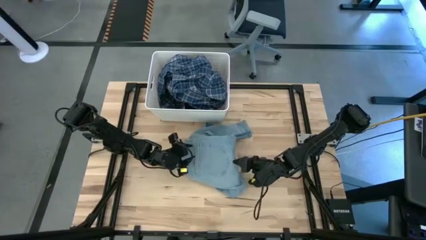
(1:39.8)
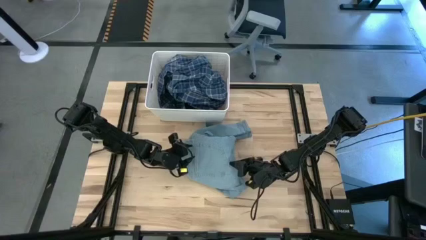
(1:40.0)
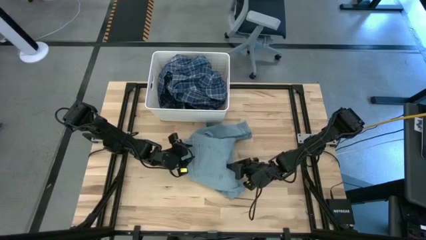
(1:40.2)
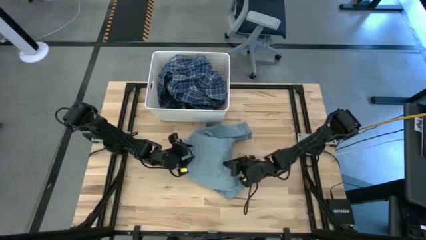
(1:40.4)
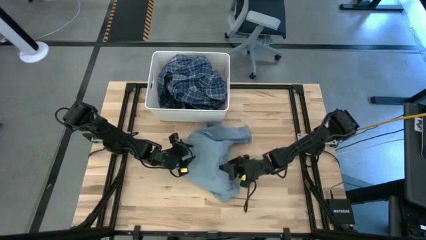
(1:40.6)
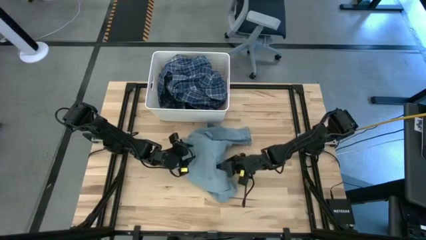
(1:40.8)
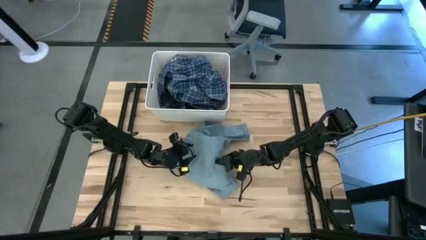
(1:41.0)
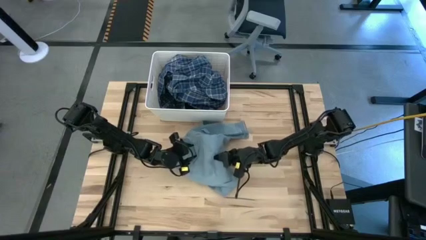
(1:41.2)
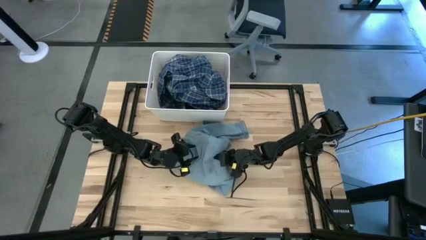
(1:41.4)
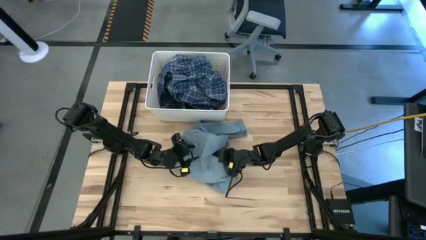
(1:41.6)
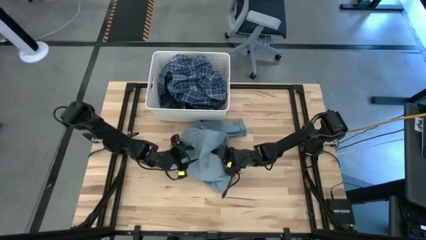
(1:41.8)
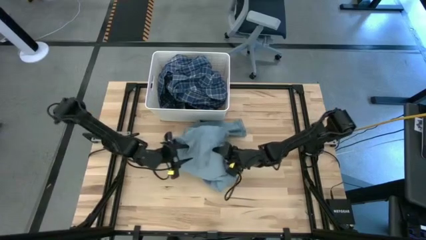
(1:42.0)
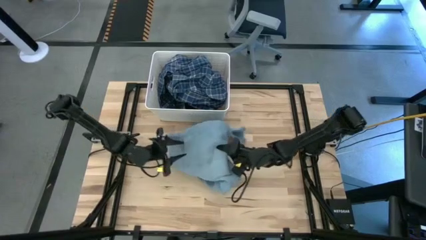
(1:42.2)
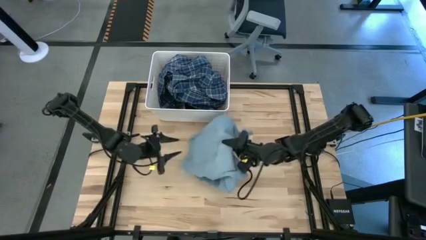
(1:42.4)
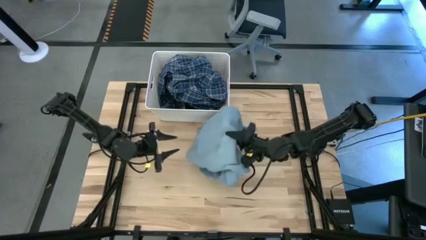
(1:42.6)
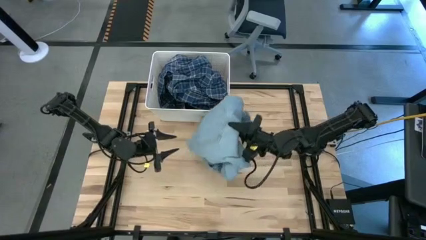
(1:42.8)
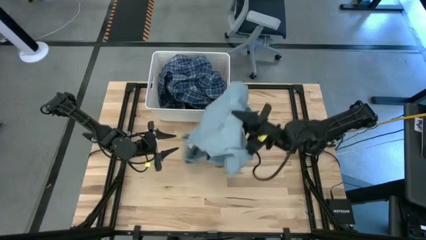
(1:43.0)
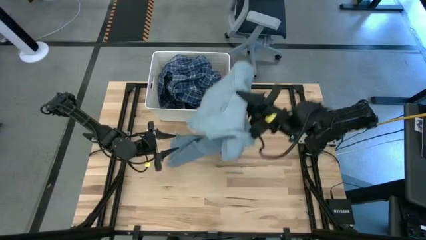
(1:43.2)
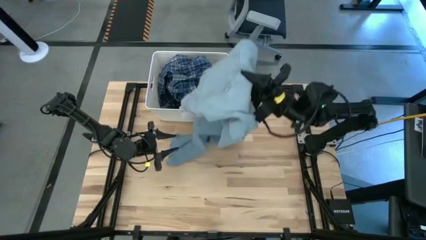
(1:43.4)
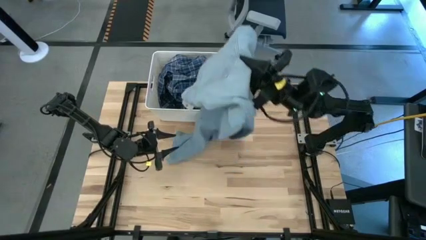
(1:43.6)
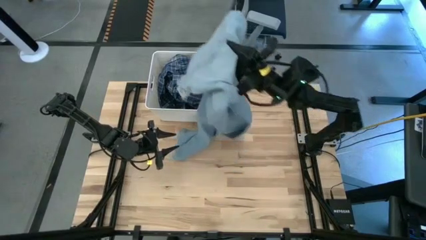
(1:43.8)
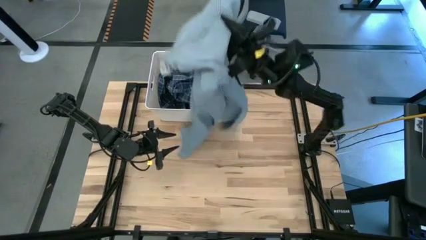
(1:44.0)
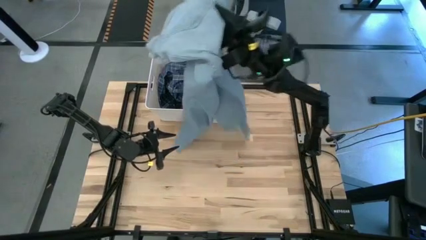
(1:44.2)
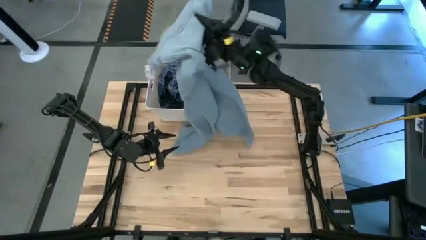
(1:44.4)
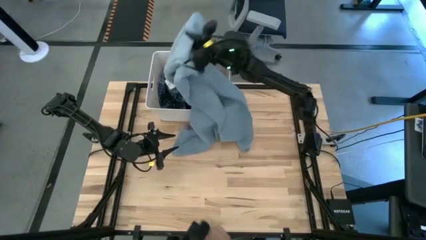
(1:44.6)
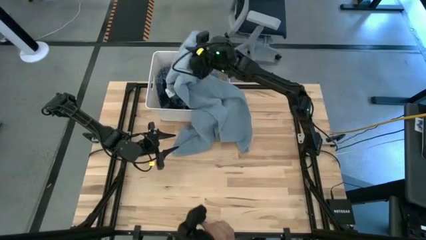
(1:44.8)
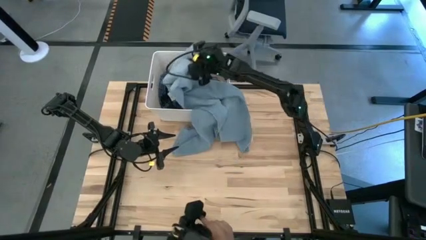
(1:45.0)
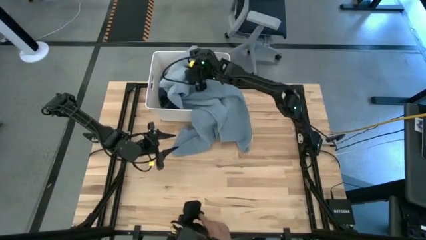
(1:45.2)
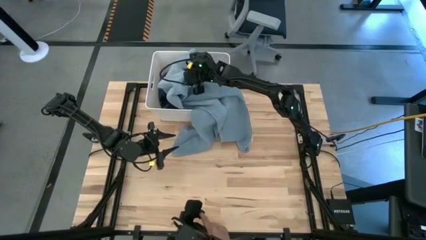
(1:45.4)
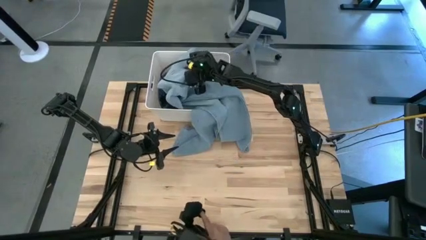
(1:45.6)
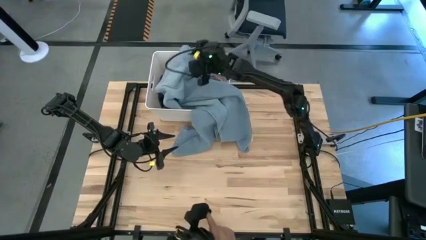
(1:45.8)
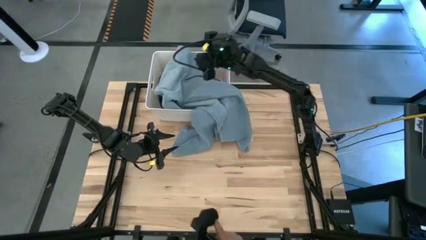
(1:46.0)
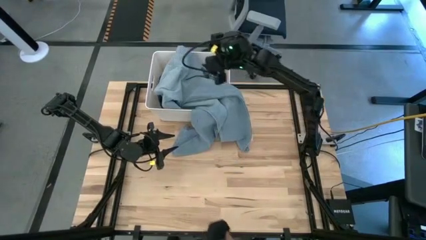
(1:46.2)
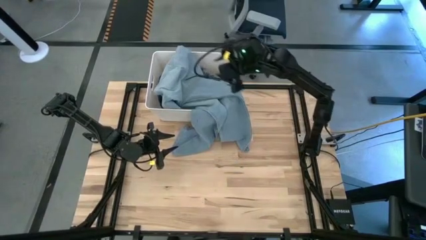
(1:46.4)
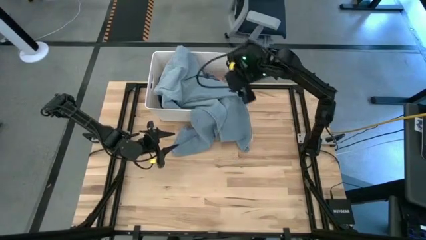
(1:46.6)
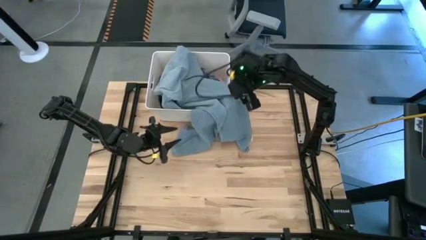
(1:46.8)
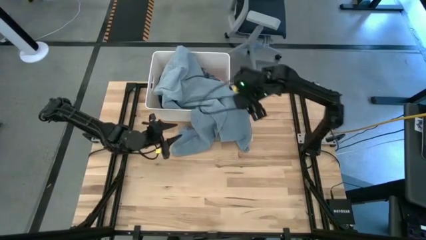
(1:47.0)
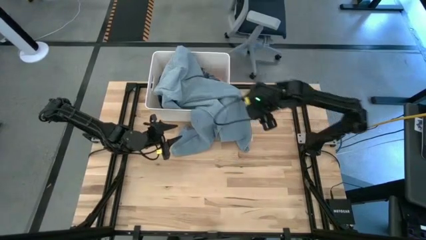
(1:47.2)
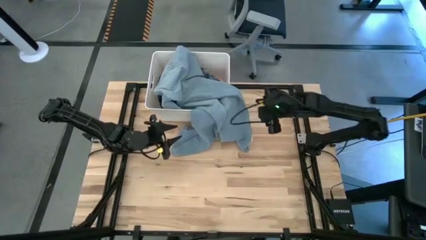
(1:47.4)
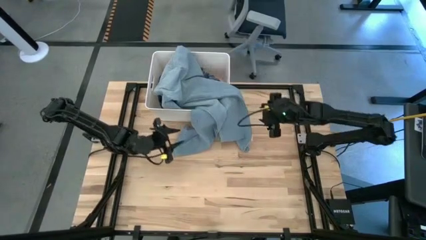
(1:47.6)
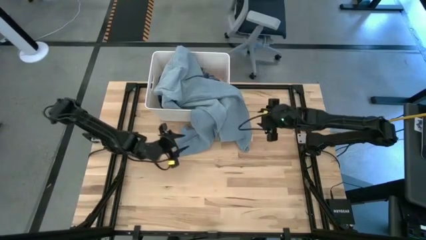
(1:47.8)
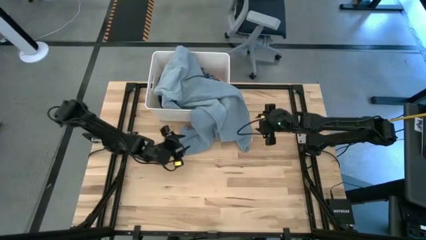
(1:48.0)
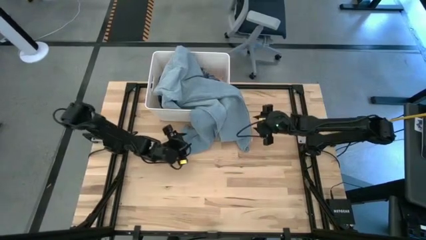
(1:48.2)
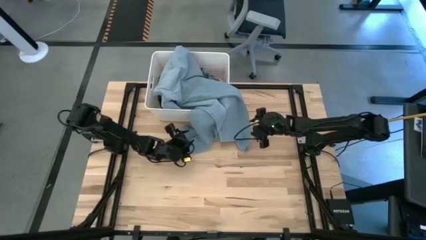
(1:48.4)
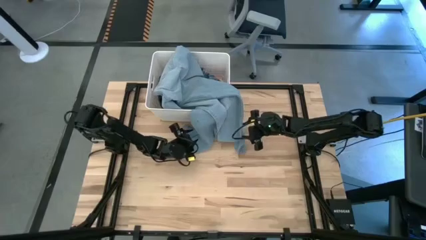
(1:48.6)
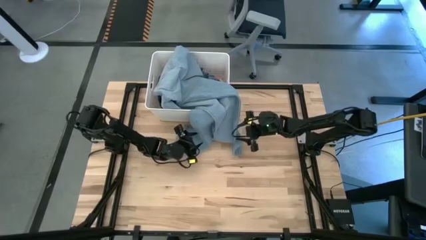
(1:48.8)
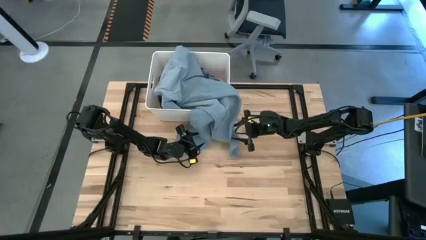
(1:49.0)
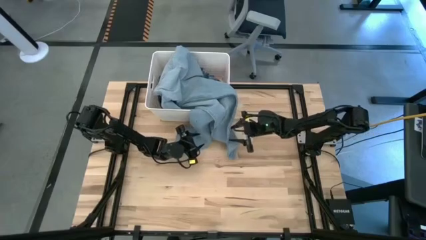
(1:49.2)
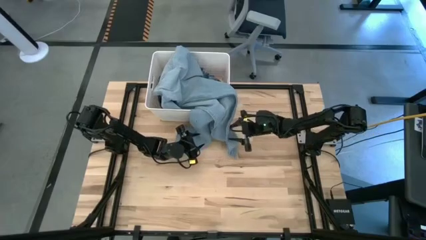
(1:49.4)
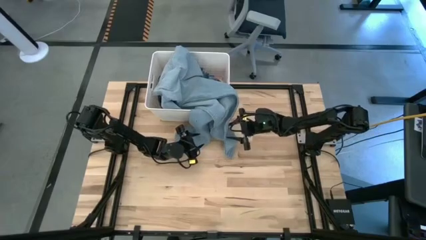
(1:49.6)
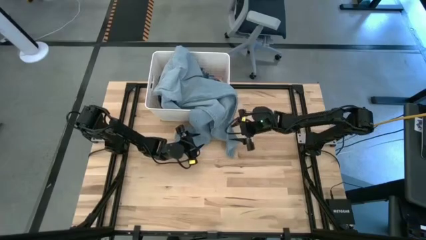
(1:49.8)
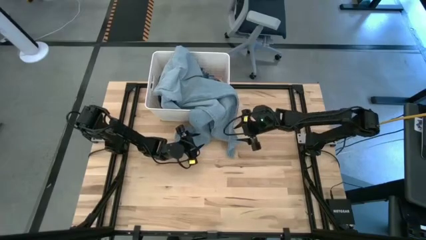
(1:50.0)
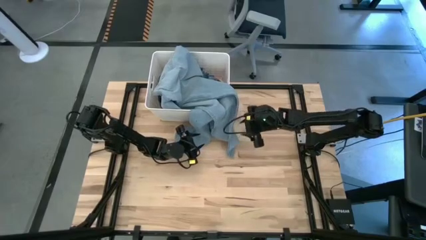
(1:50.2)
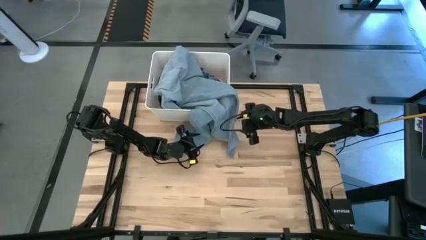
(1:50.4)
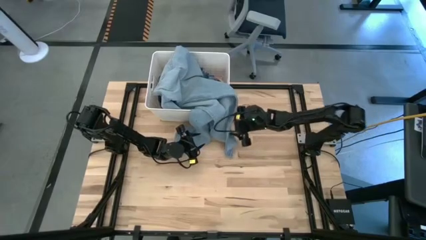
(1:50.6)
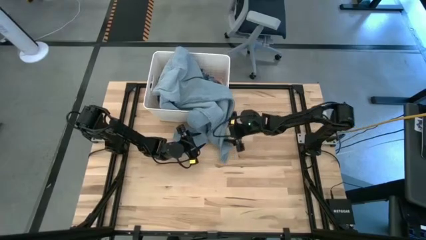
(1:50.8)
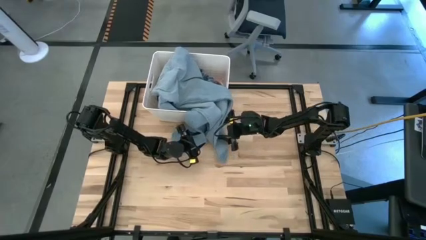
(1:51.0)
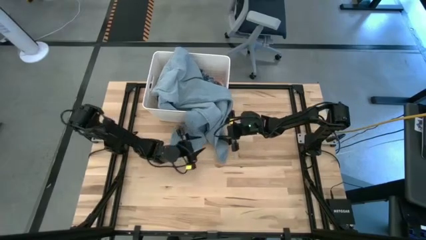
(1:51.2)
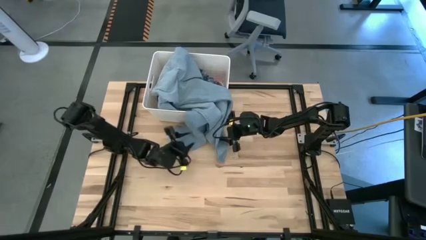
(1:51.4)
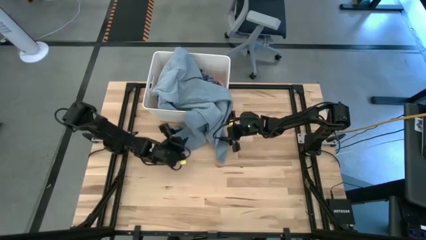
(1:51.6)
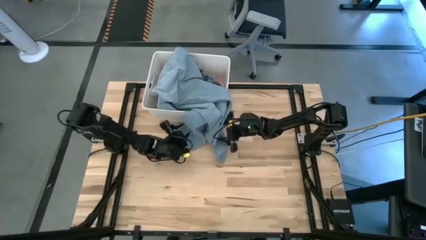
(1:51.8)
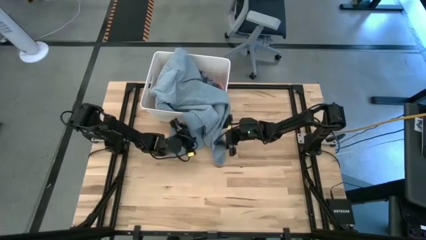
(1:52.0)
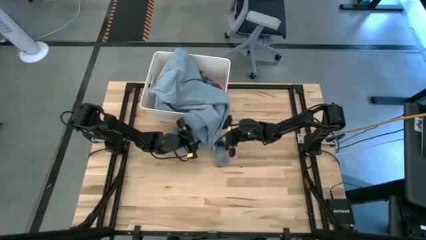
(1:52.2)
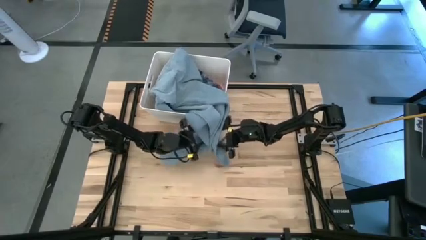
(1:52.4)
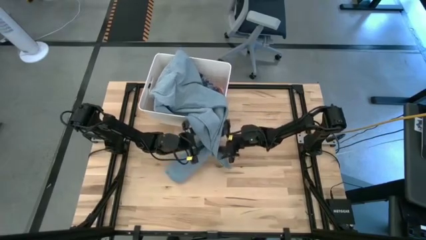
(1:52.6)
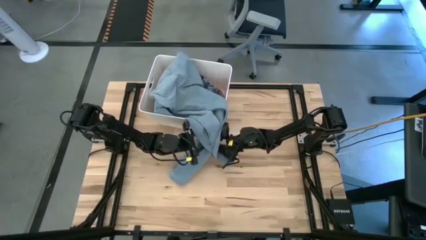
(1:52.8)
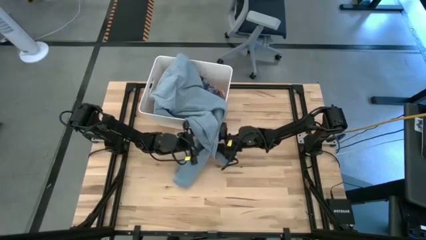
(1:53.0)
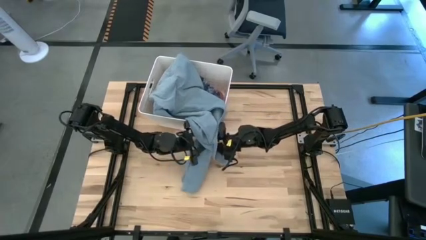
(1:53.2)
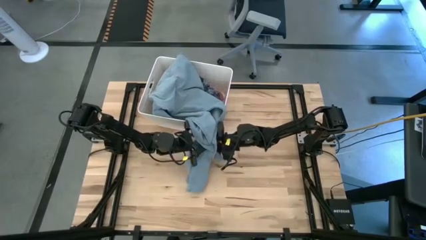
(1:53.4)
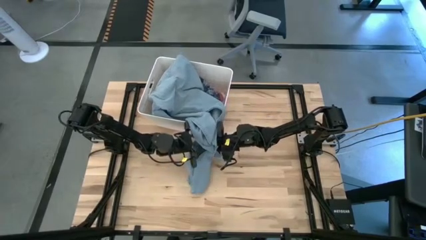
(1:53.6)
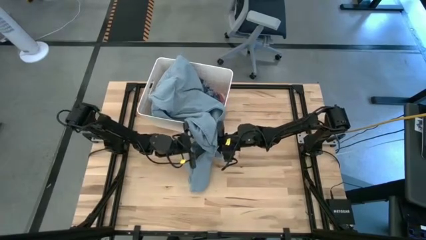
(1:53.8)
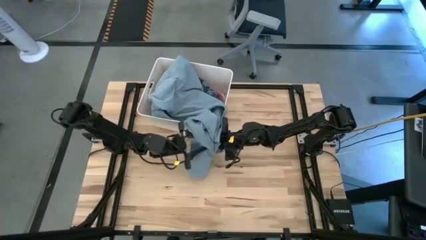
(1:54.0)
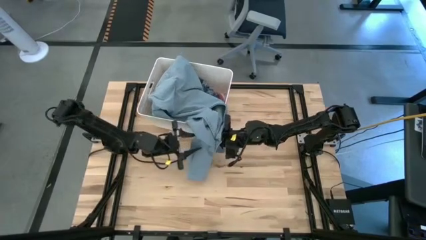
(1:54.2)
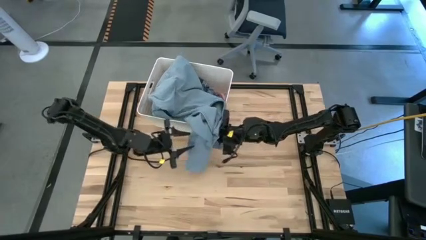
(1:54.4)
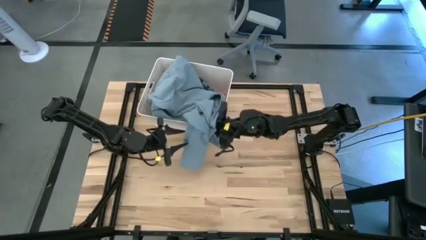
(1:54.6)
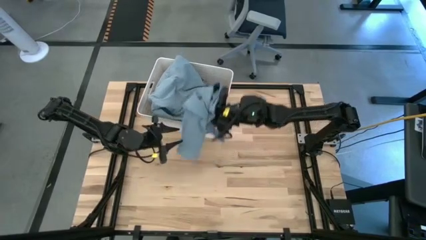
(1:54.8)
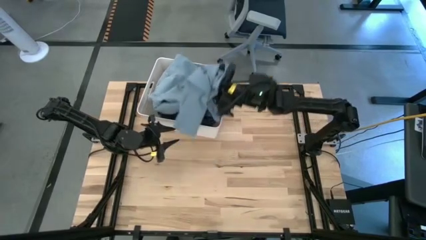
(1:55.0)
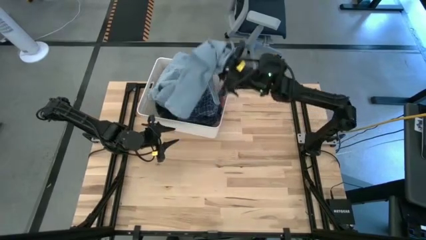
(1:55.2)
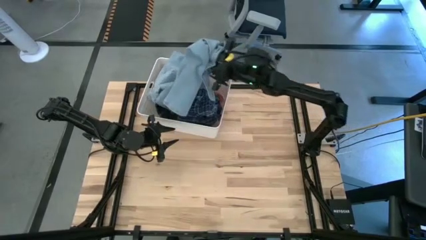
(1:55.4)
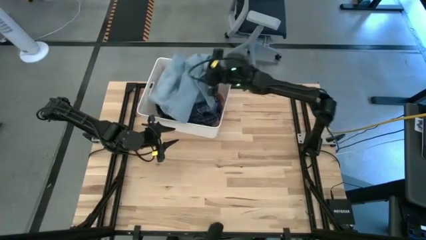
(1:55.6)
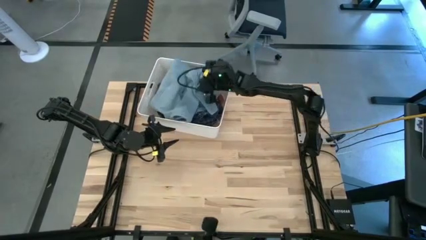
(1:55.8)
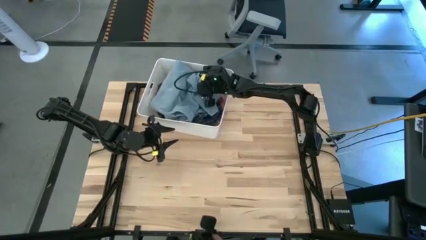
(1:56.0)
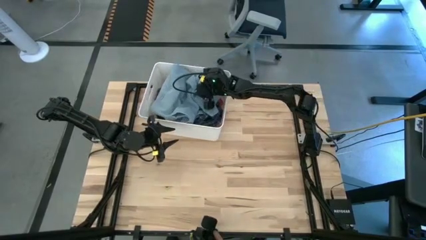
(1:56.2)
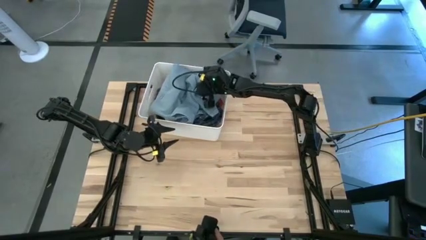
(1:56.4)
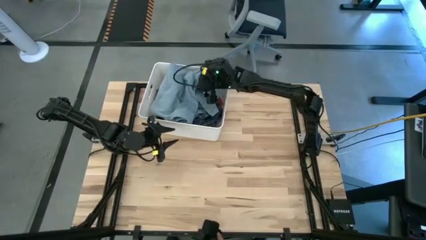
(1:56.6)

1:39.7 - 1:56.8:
Task: Sort clothes
Put the blue pants into the white bin
